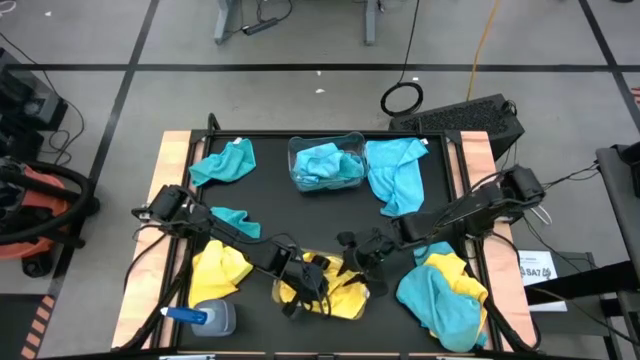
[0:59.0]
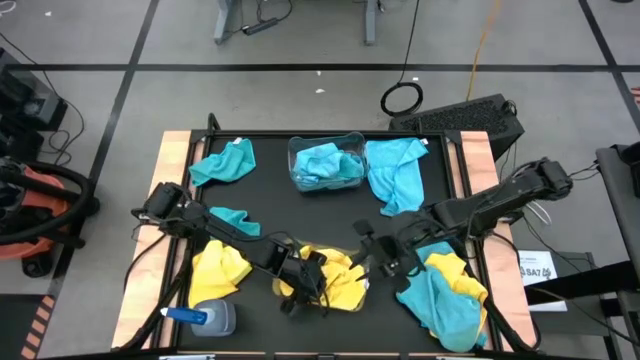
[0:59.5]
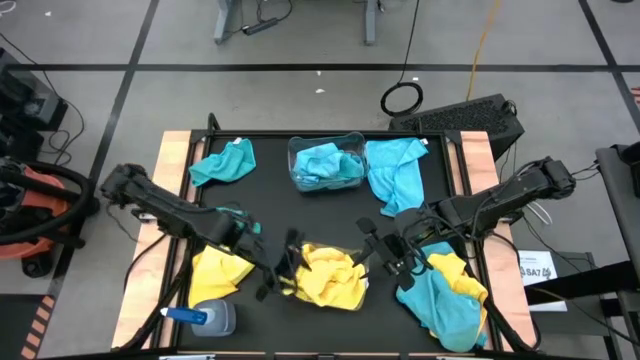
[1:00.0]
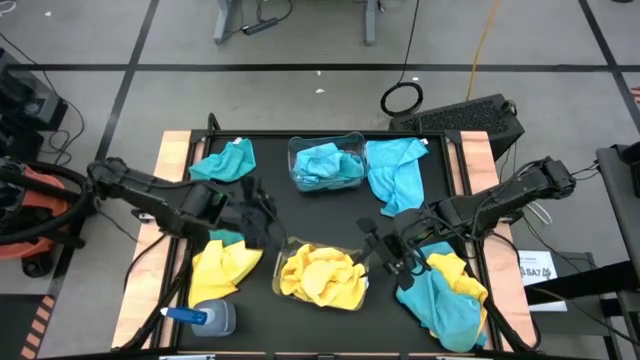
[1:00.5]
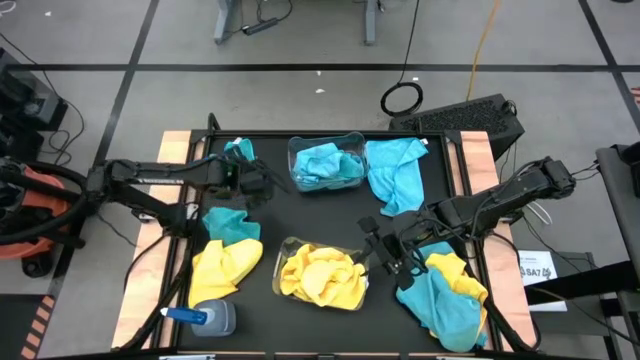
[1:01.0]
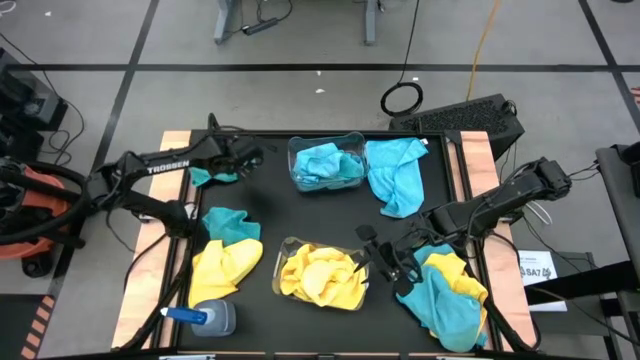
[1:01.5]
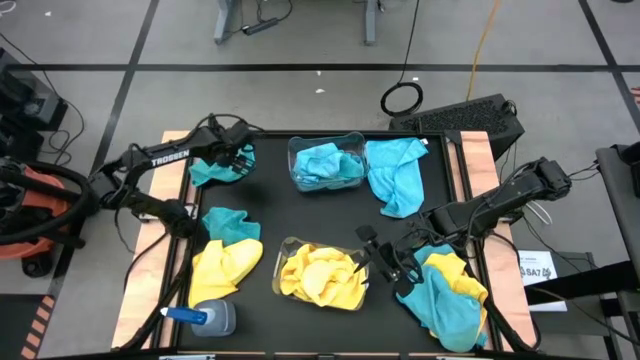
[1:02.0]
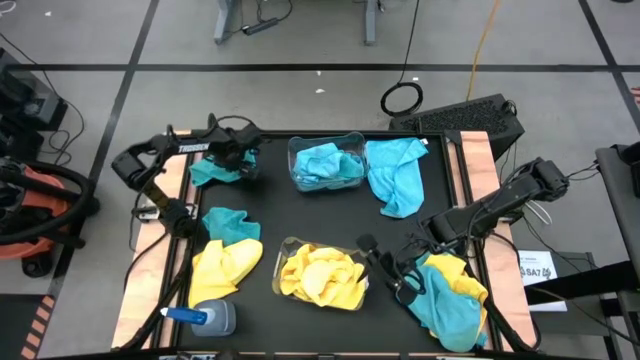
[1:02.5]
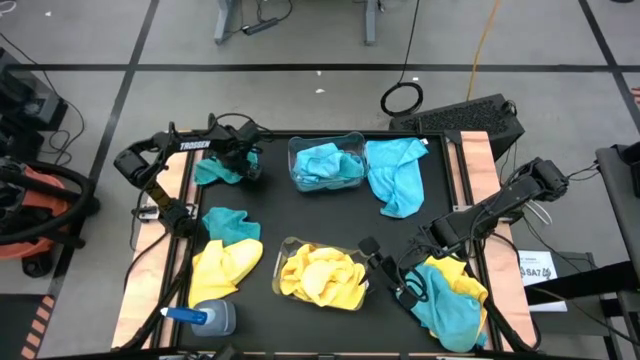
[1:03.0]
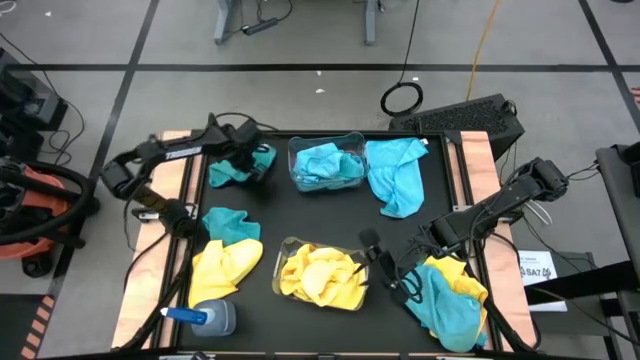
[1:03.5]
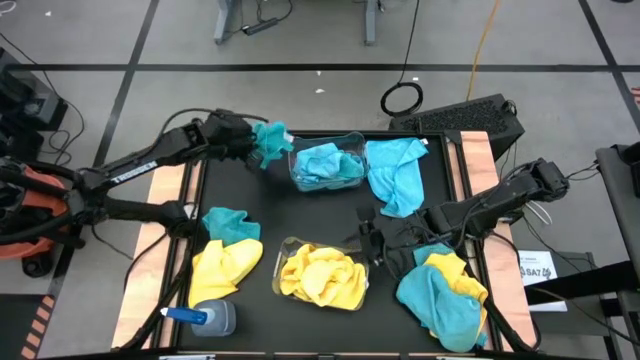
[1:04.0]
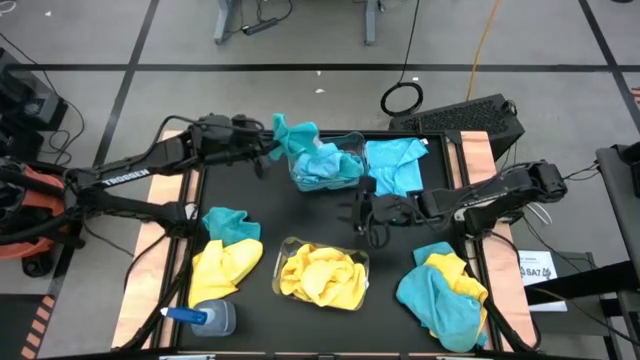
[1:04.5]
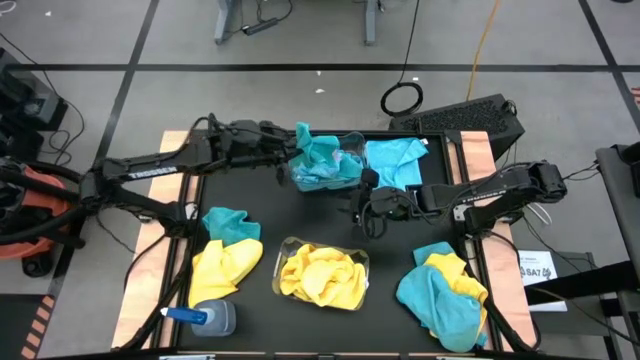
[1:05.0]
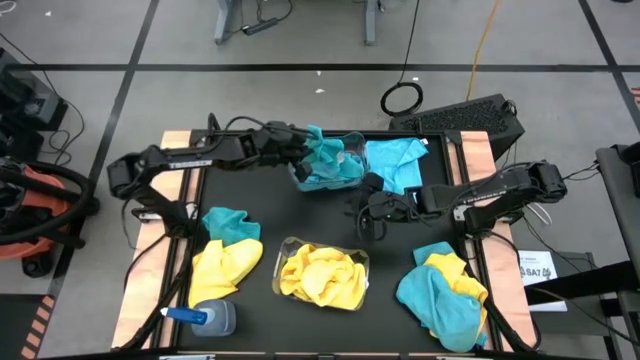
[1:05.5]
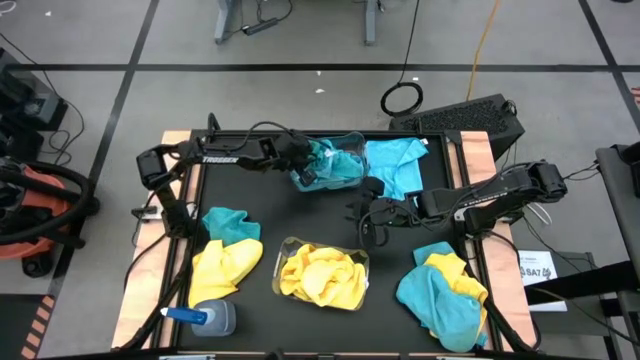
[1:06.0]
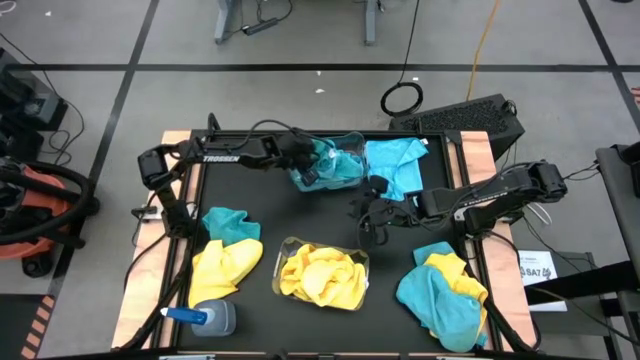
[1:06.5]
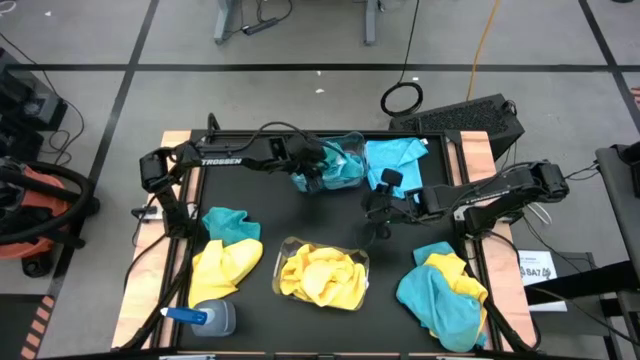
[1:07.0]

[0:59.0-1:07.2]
Task: Sort microfiber towel by color & place in baskets
Put the blue microfiber towel into the top transparent bin

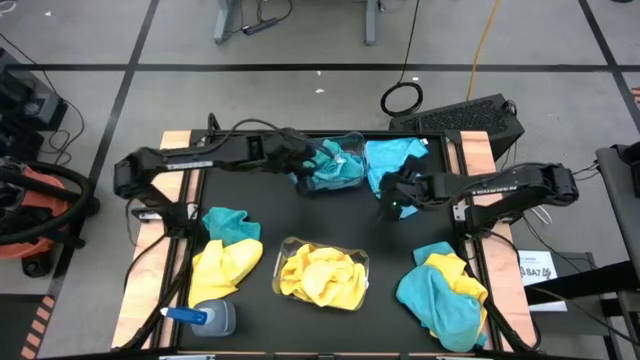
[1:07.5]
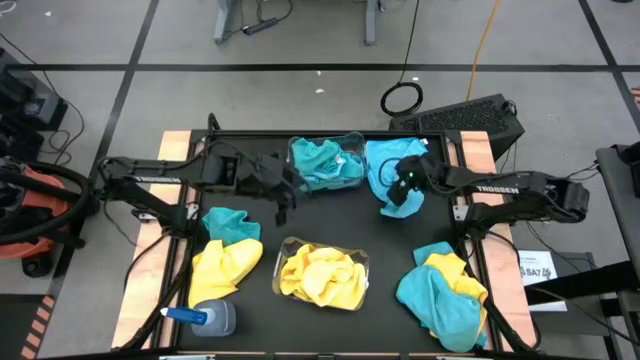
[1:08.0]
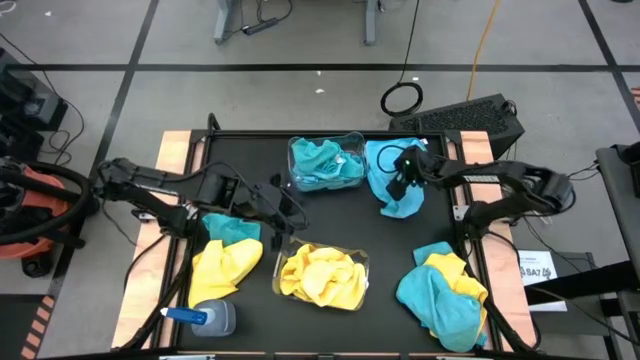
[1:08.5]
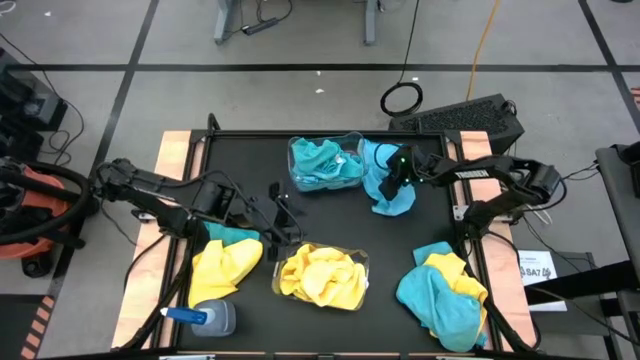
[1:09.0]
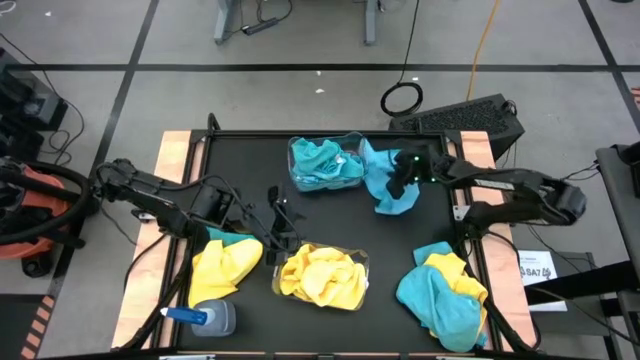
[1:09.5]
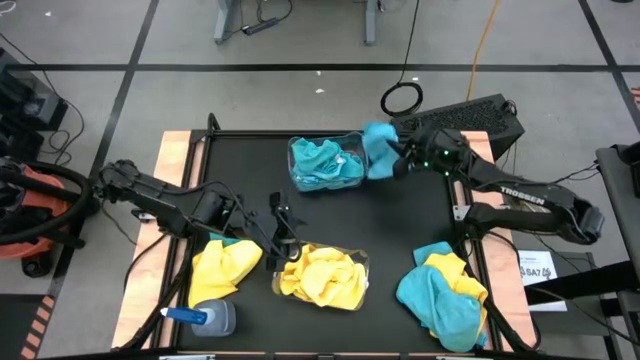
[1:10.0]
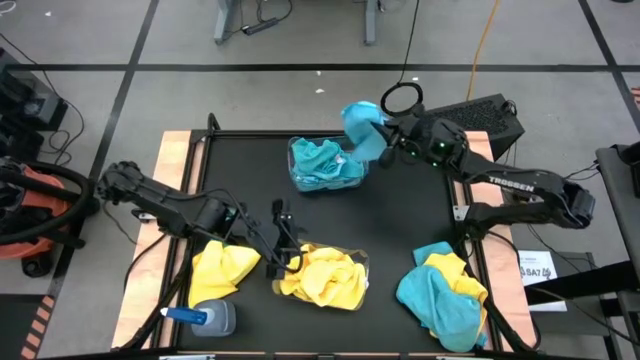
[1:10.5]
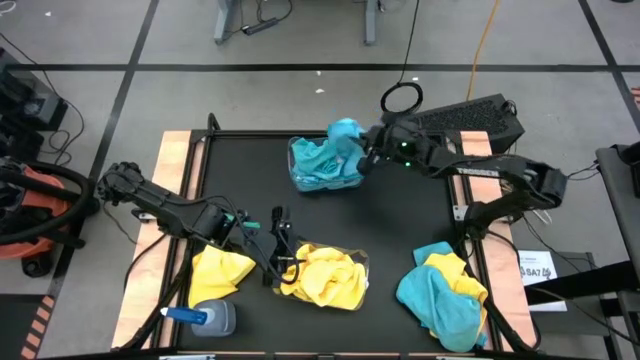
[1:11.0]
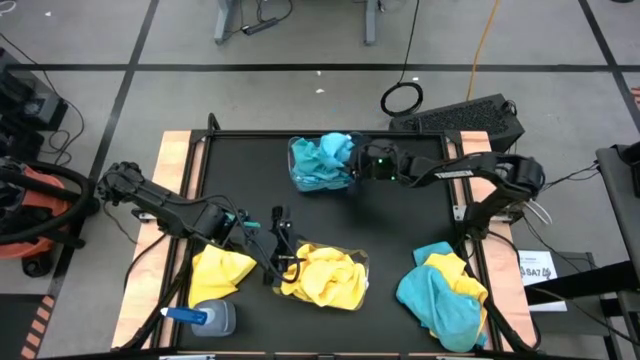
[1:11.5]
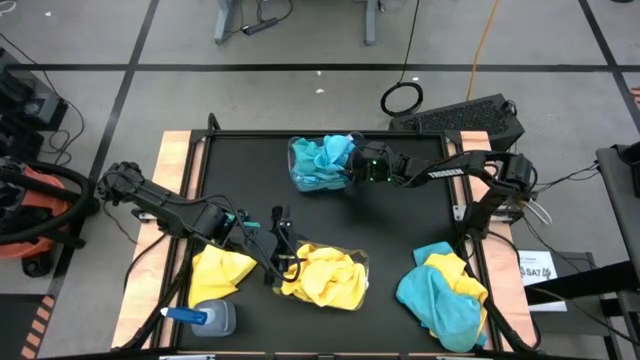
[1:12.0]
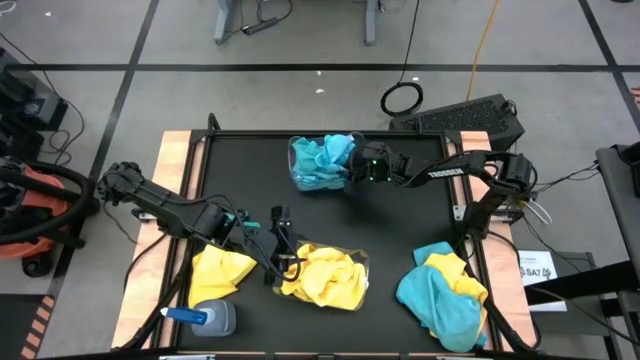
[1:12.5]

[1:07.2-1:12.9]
Put the blue microfiber towel into the top transparent bin

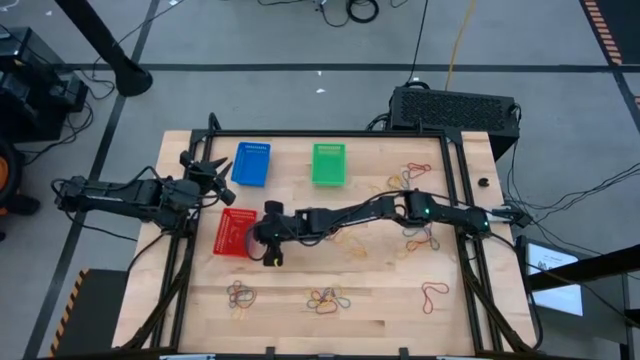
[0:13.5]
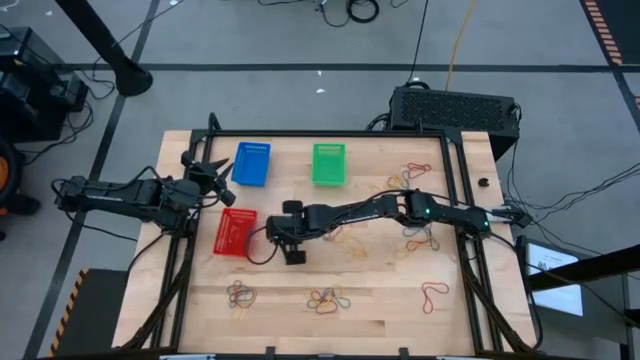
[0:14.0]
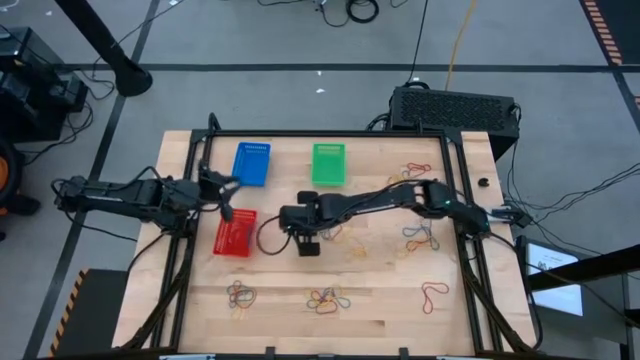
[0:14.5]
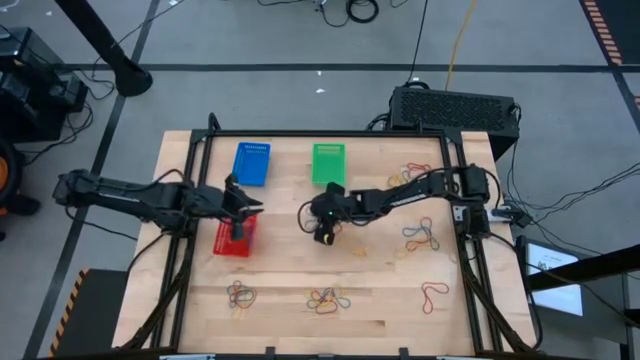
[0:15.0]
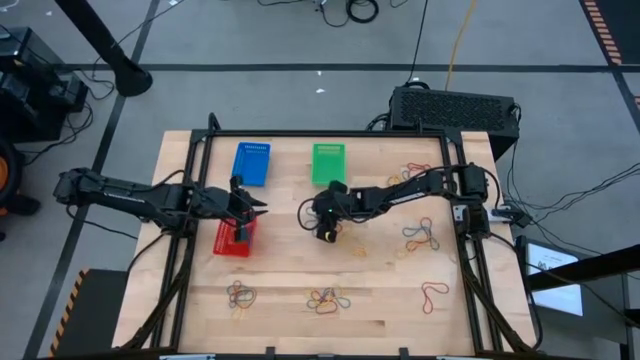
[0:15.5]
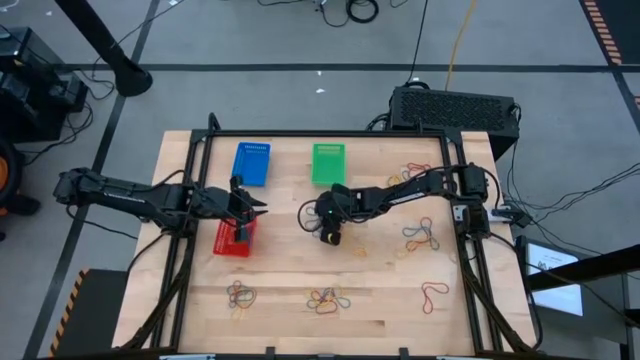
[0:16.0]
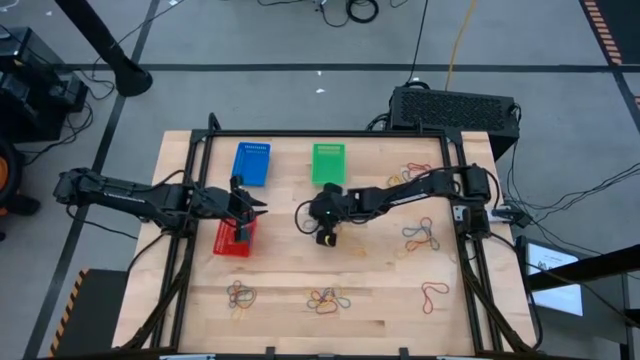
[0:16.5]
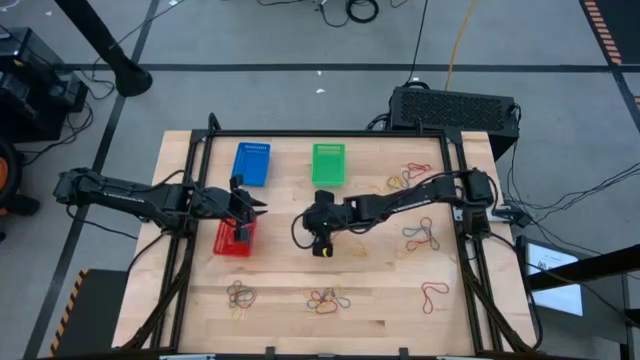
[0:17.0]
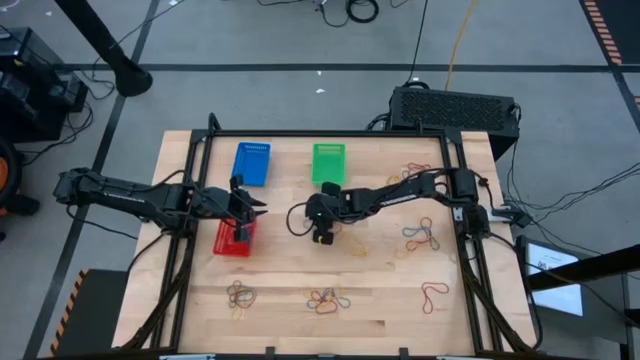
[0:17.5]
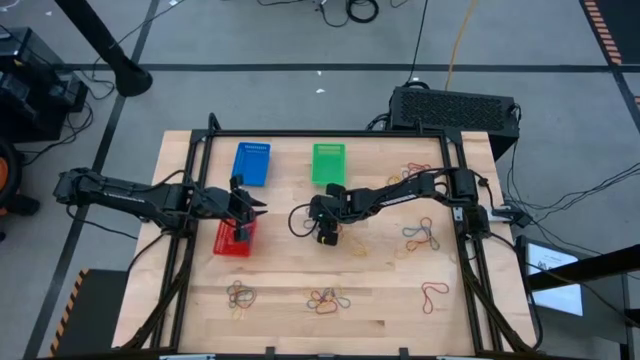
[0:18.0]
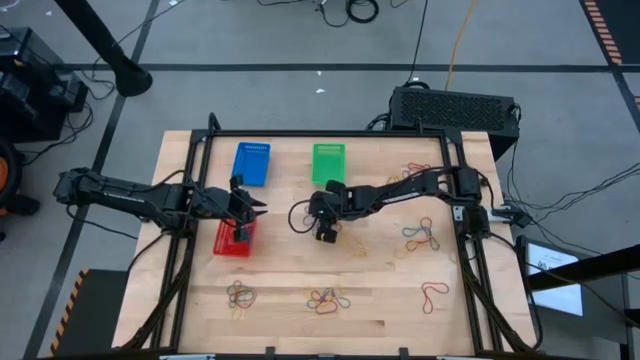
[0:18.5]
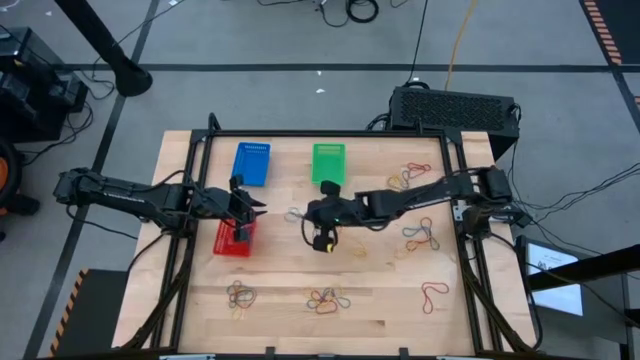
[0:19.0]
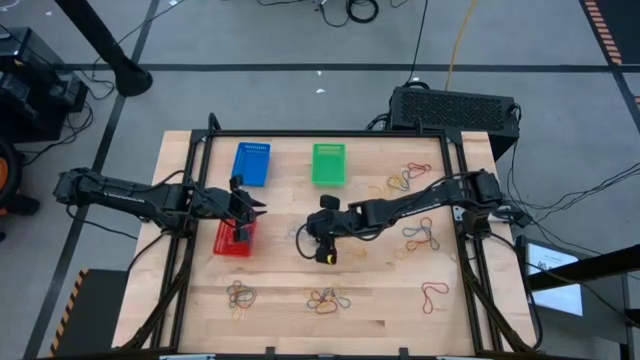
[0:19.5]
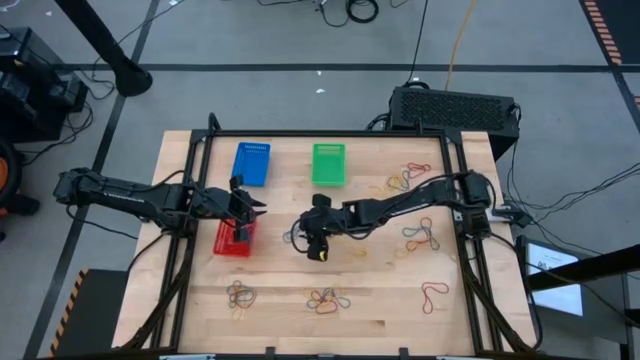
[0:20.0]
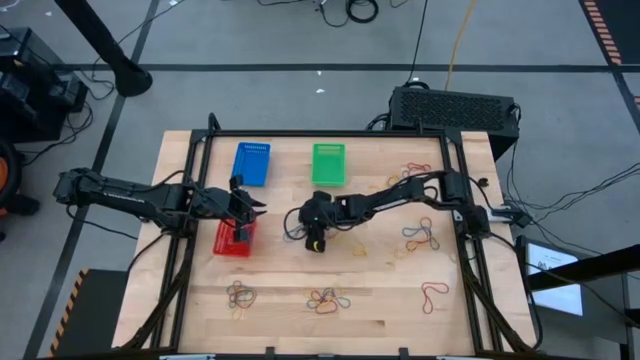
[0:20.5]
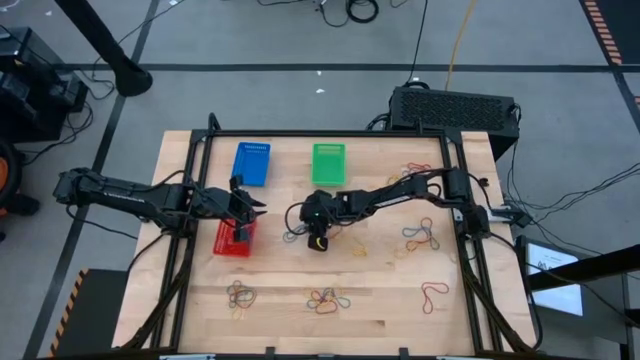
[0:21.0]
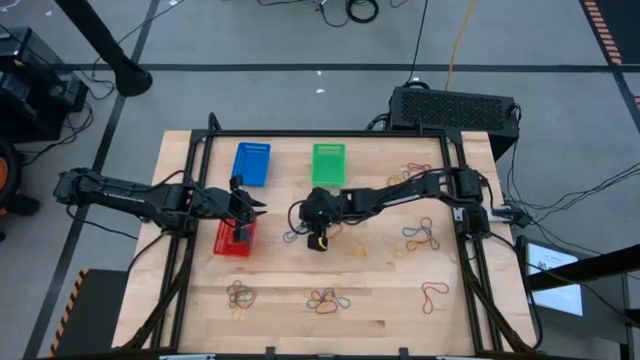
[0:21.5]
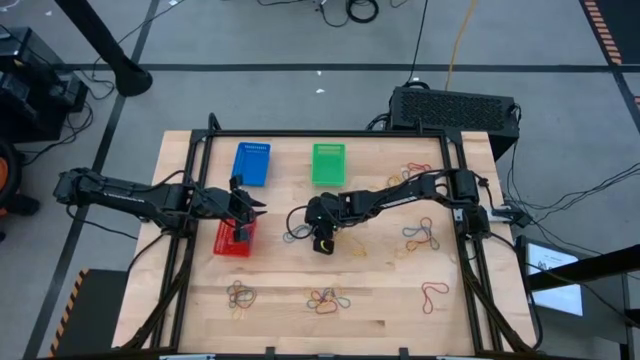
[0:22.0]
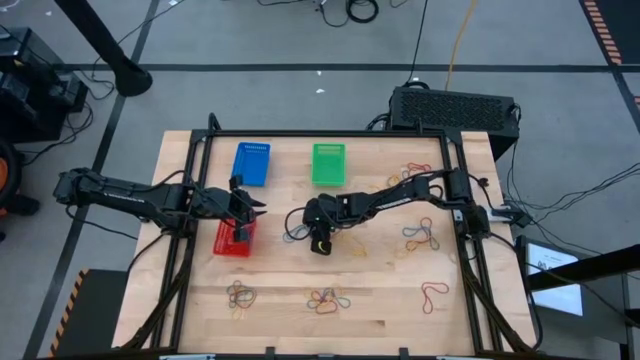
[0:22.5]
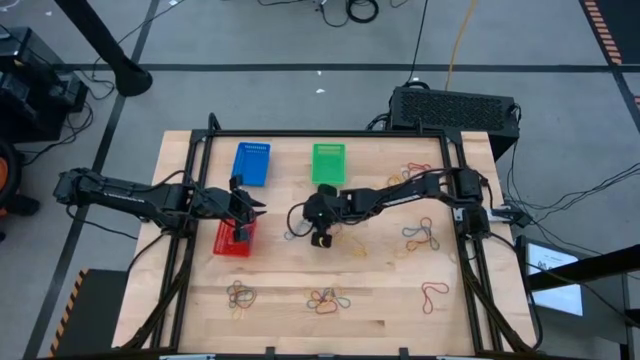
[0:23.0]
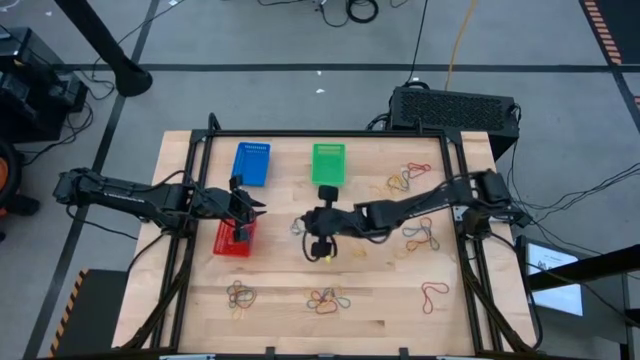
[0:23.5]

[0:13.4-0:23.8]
Task: Sort rubber bands into baskets
Put the blue rubber band into the red basket
